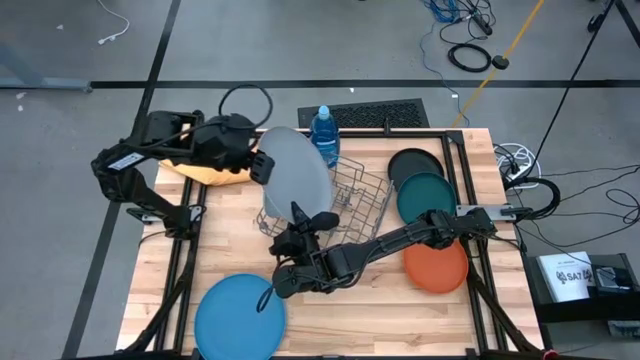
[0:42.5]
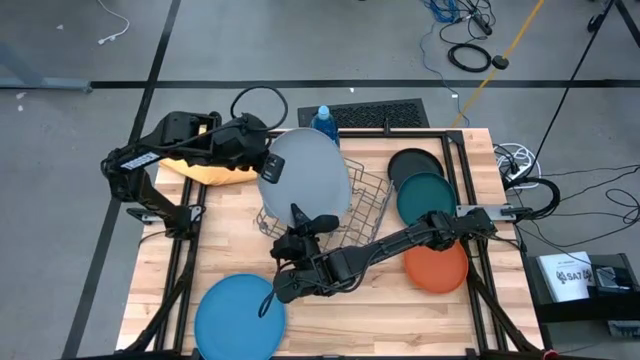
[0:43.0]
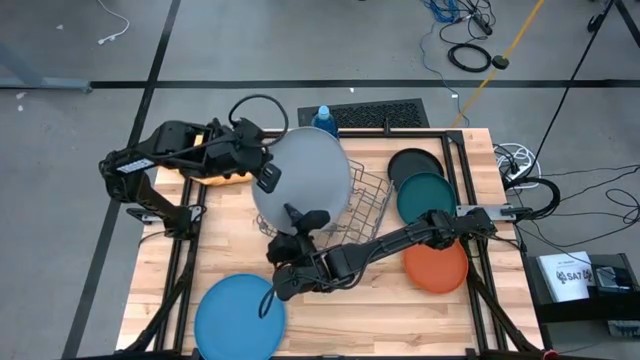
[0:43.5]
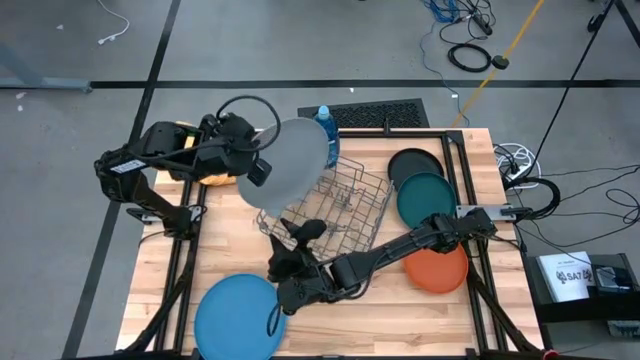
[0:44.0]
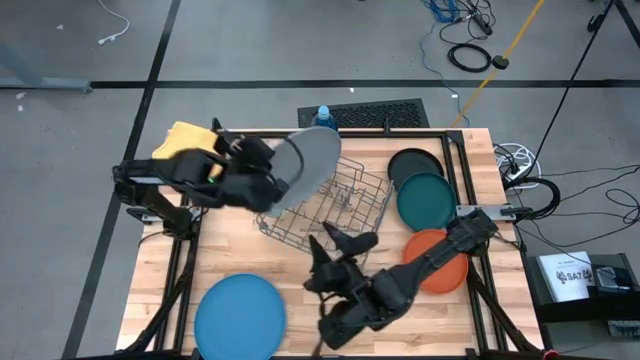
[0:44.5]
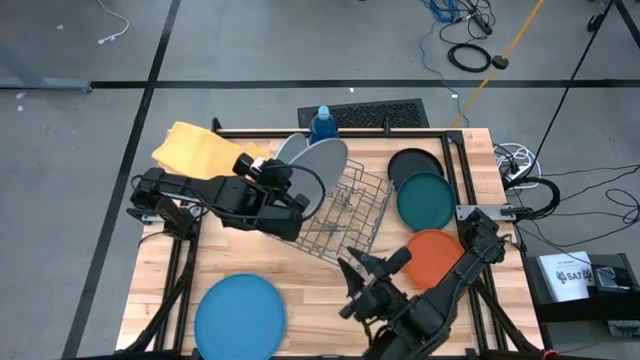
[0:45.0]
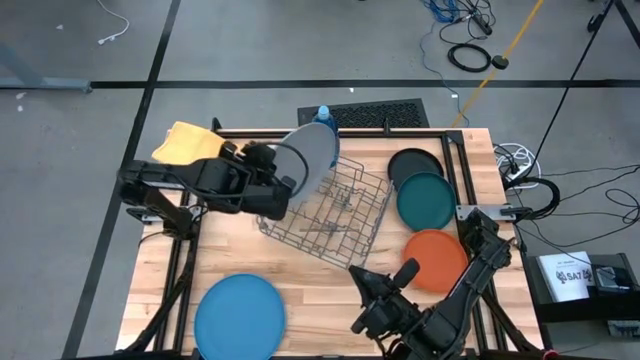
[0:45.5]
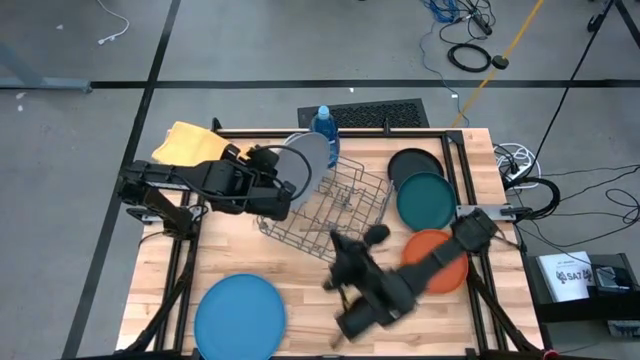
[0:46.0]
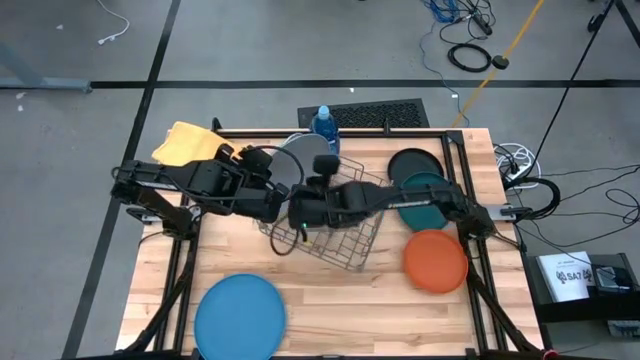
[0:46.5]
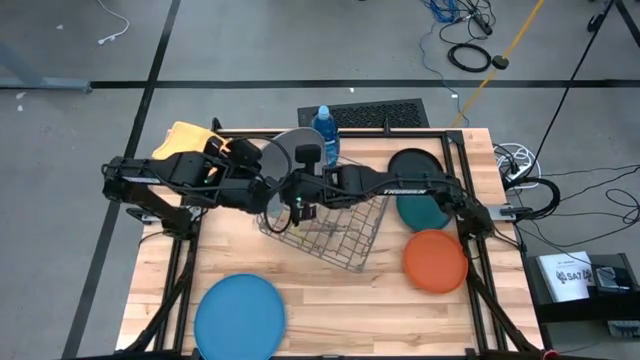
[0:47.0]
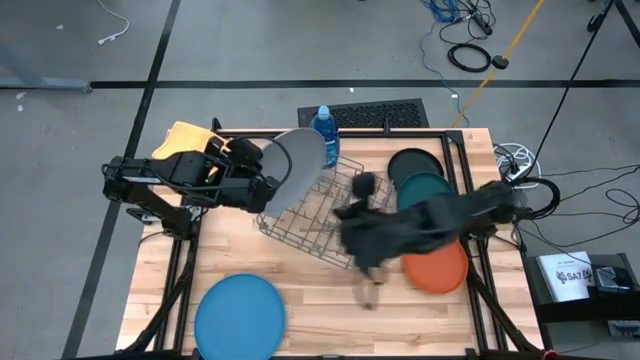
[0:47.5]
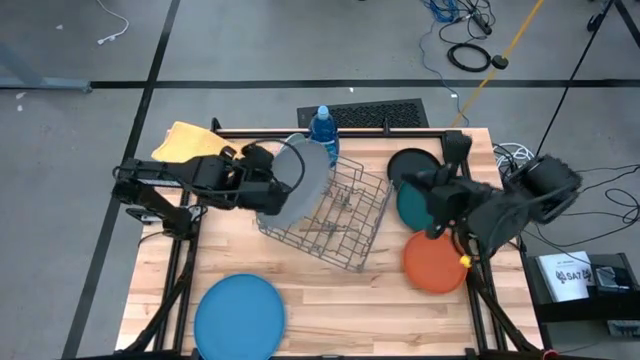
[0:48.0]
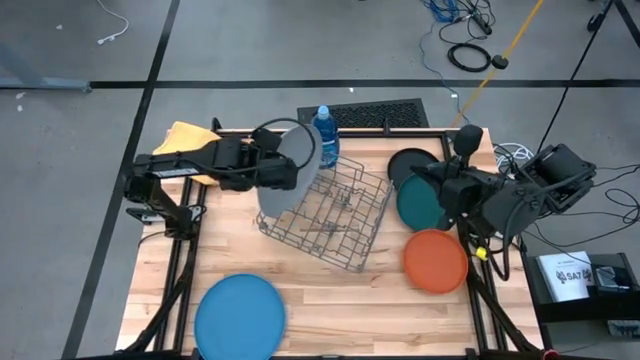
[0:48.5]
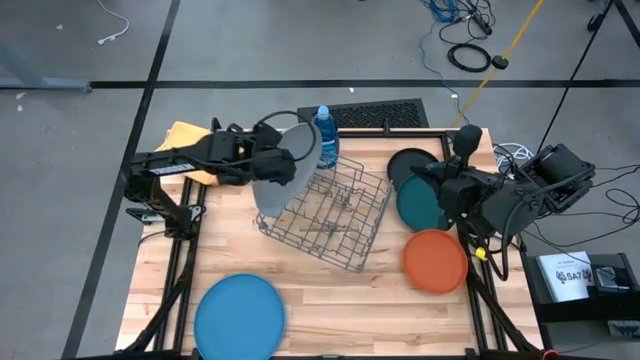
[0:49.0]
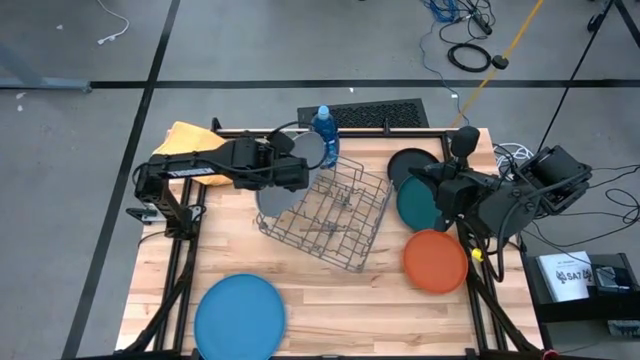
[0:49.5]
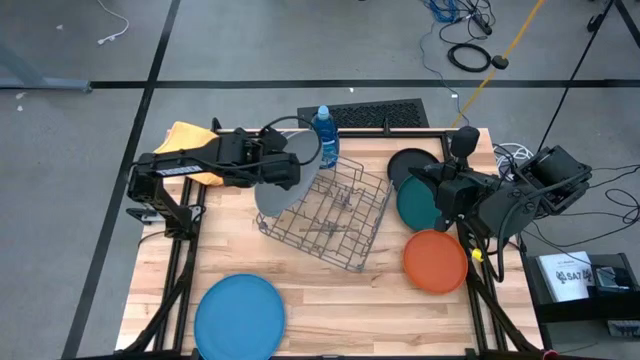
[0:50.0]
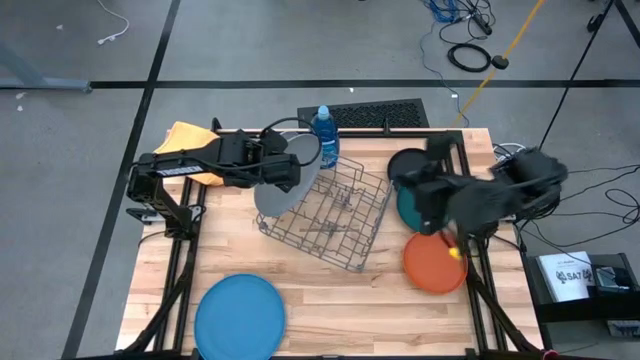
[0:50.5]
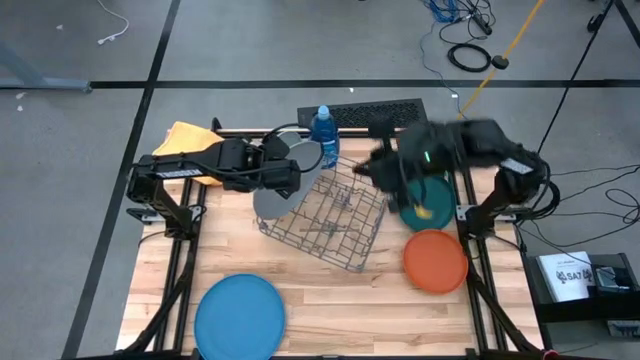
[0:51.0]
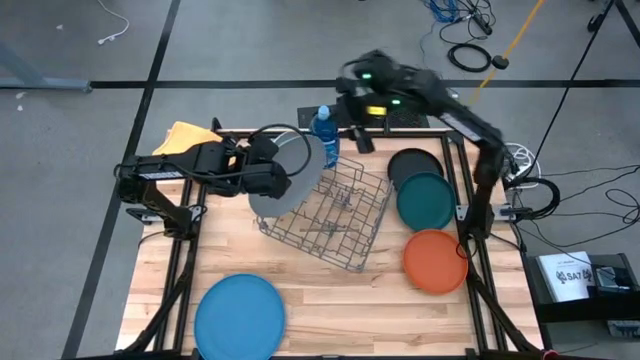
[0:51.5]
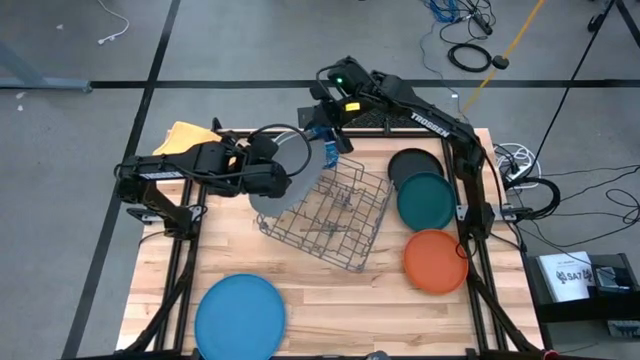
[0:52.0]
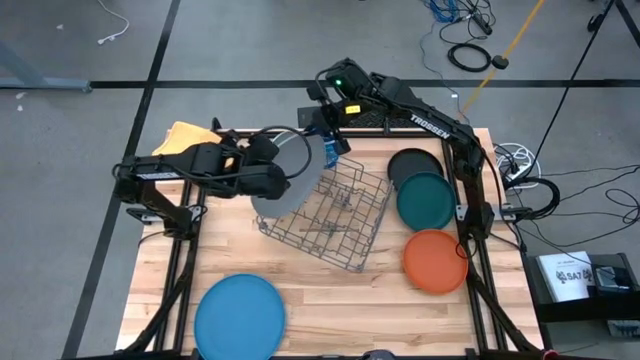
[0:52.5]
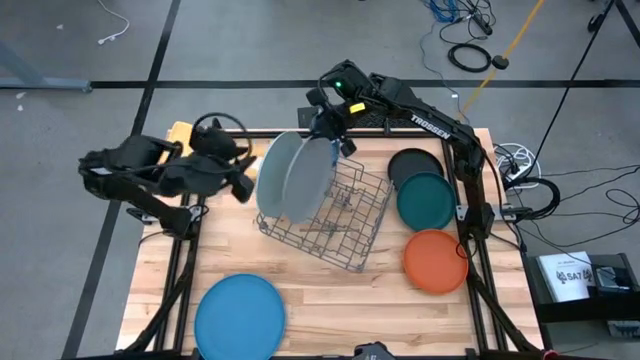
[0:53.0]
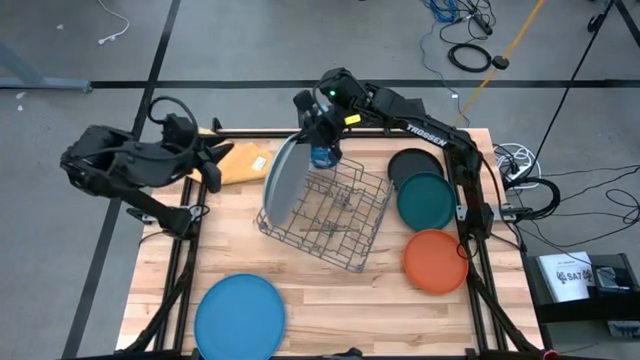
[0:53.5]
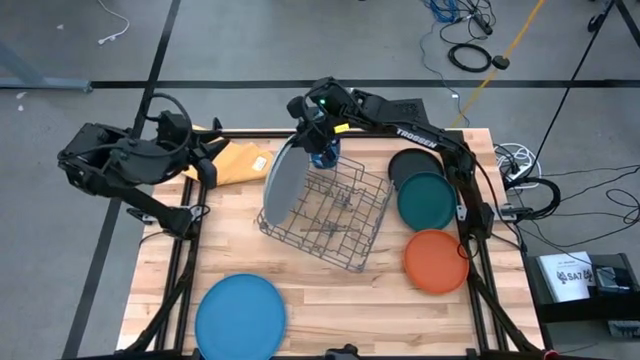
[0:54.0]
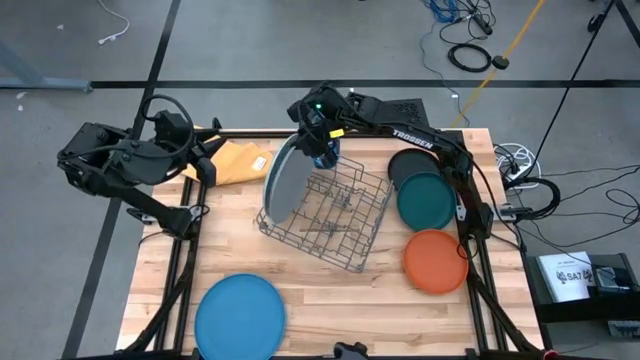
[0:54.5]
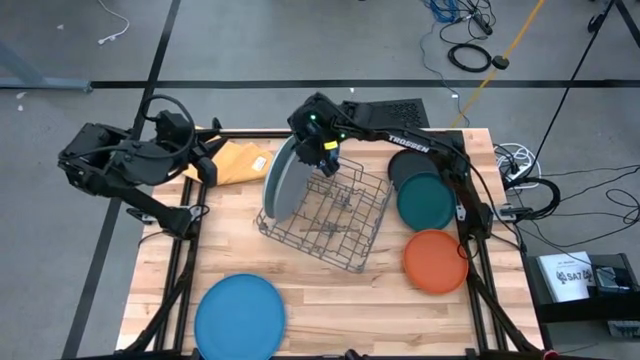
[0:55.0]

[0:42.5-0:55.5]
Task: Sort dishes
Put the gray plate into the dish rack

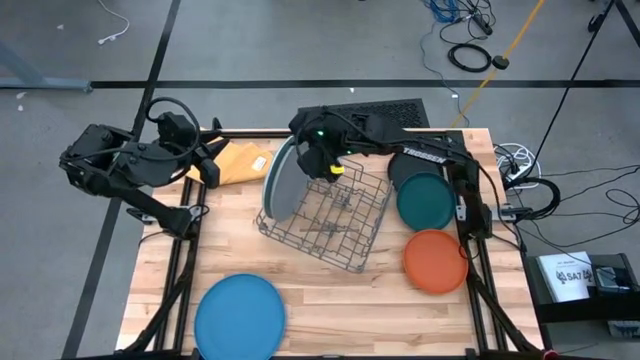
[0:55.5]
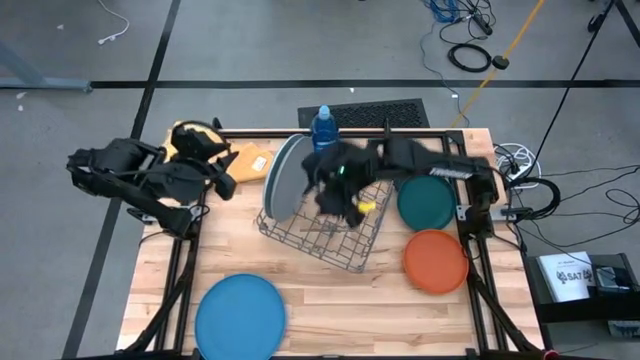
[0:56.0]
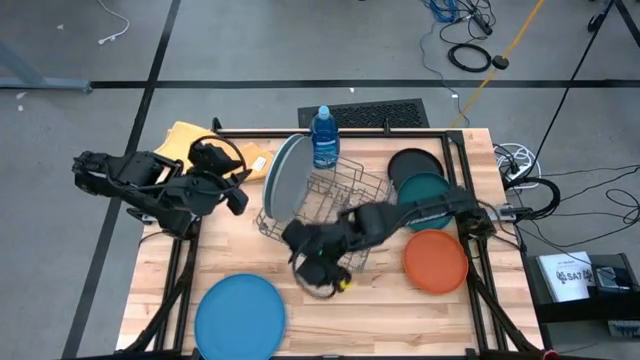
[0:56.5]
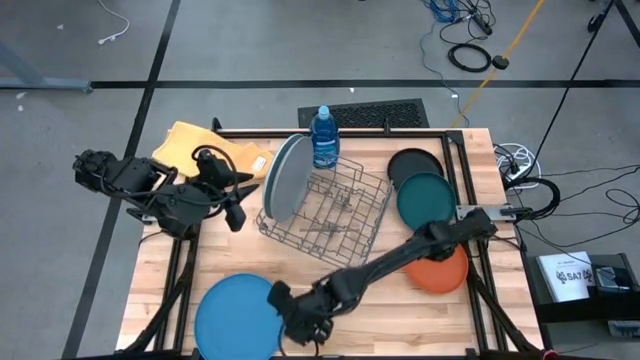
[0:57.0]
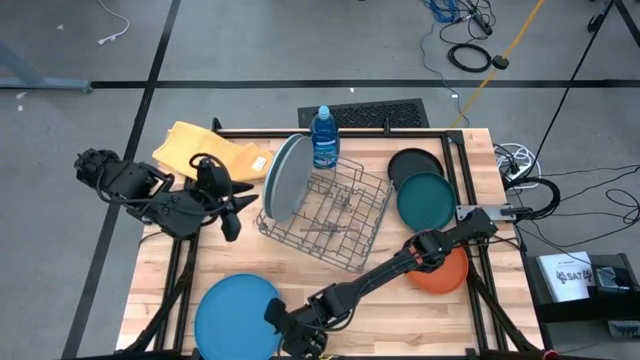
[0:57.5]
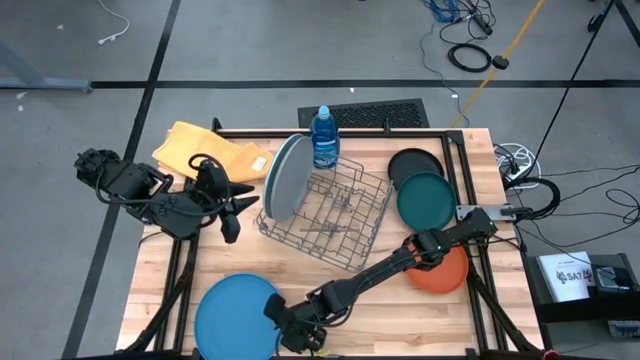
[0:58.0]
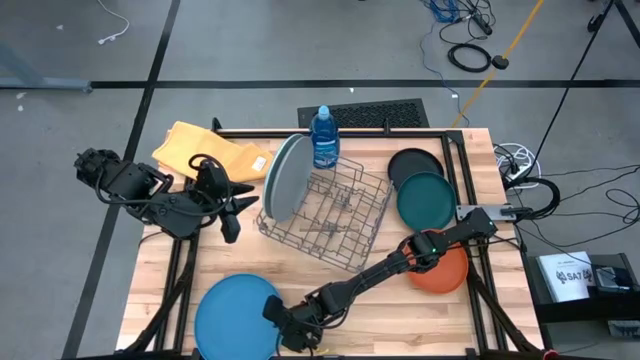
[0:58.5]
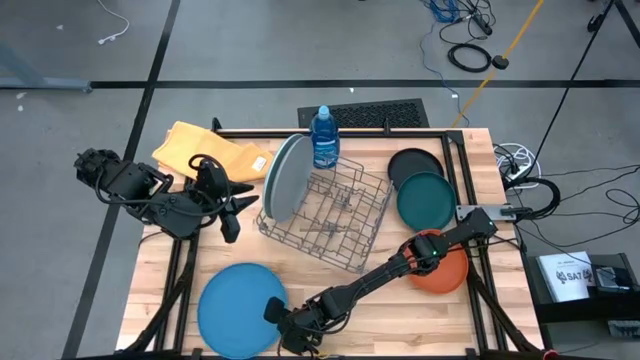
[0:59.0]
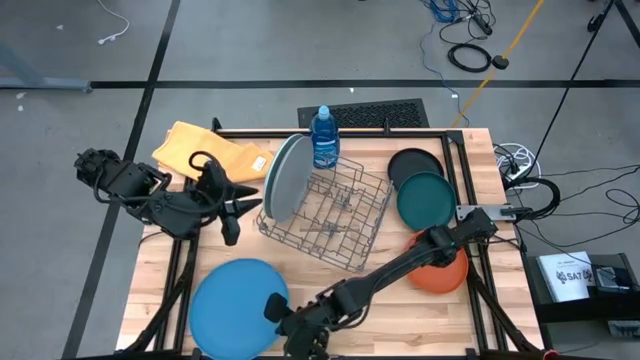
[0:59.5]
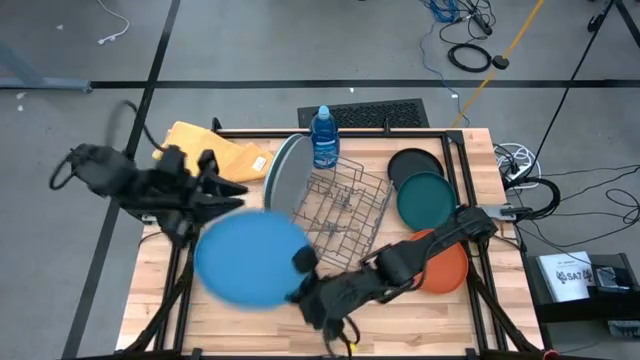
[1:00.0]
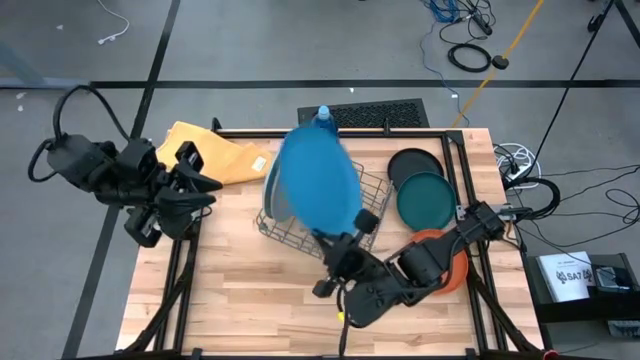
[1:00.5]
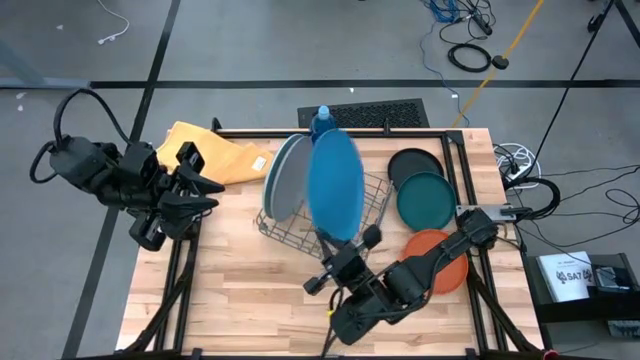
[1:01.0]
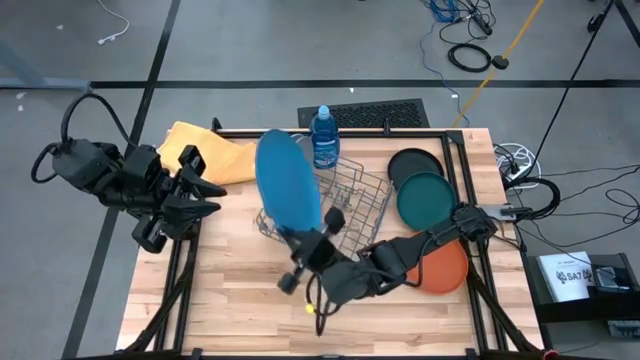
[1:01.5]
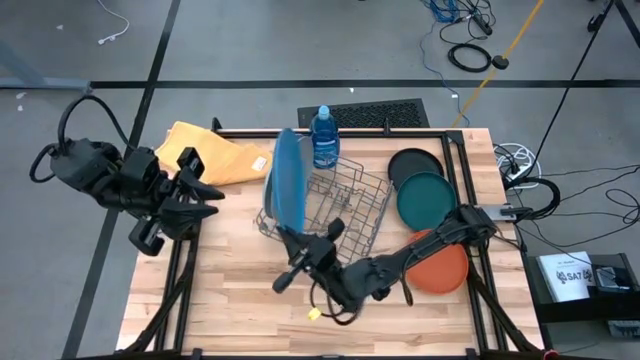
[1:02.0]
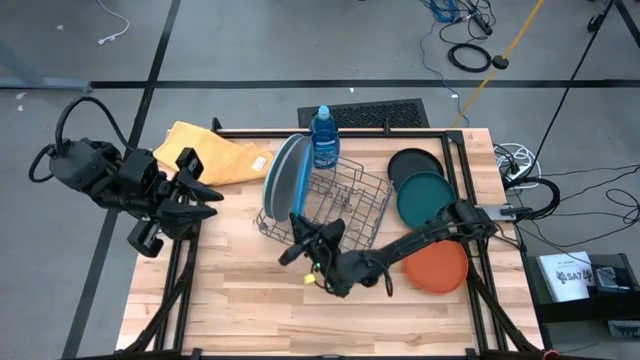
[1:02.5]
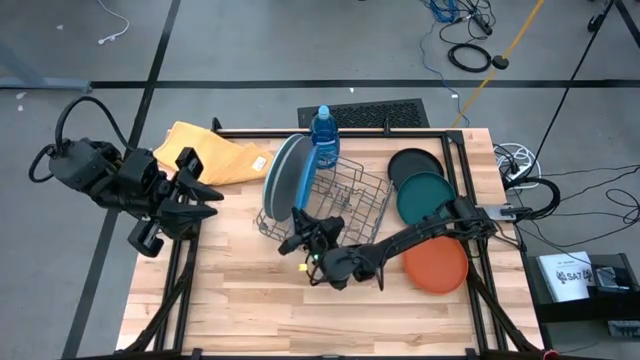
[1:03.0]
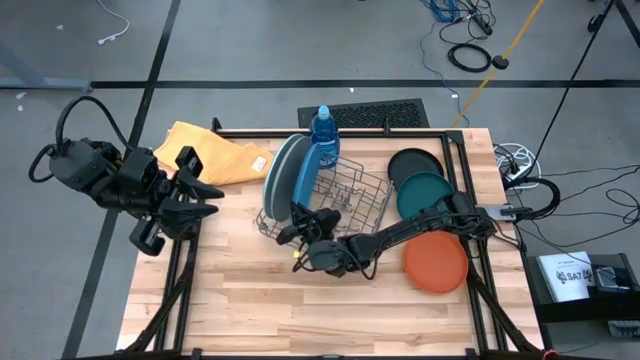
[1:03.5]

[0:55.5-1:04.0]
Put the blue plate into the dish rack
